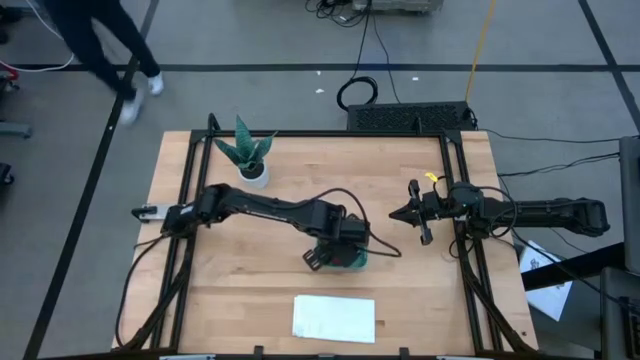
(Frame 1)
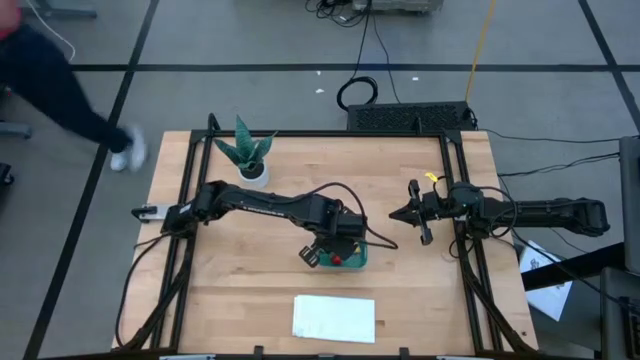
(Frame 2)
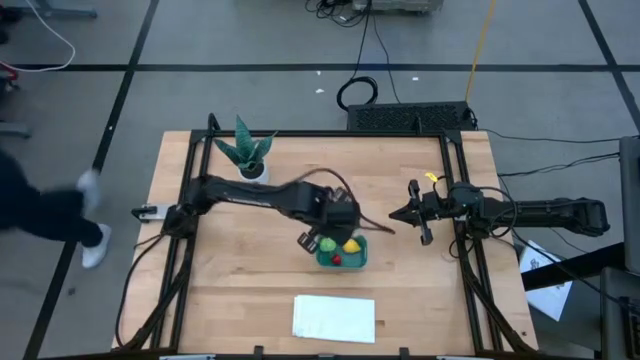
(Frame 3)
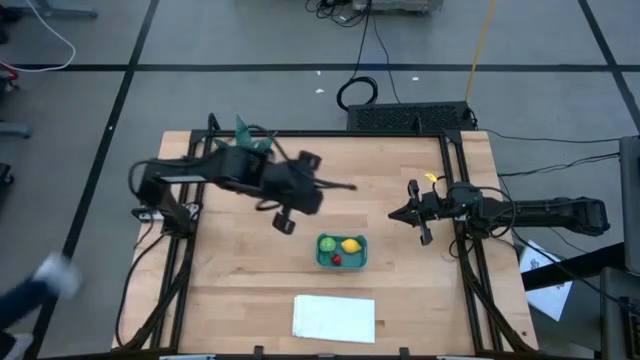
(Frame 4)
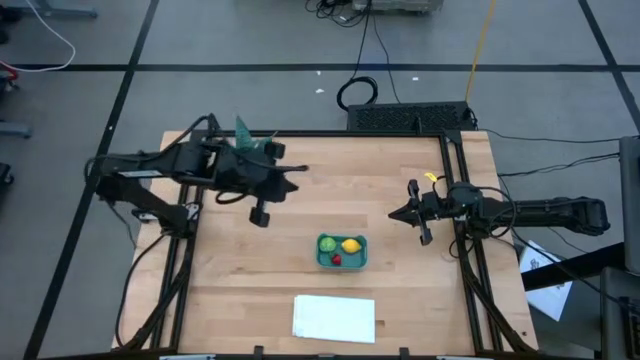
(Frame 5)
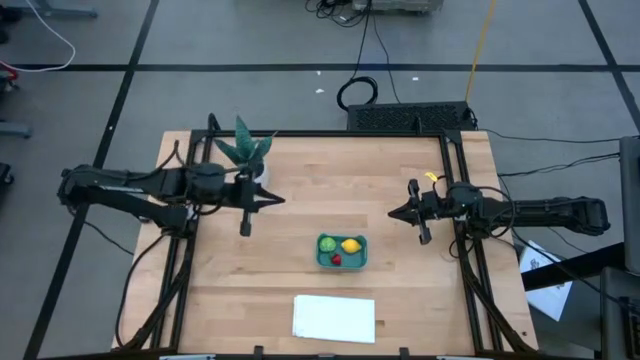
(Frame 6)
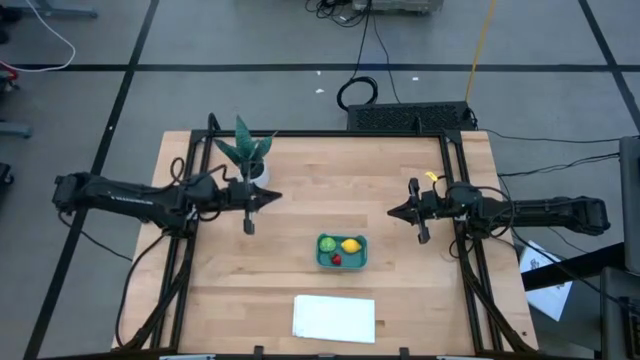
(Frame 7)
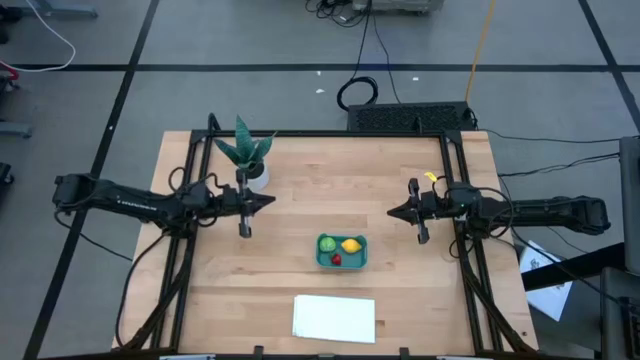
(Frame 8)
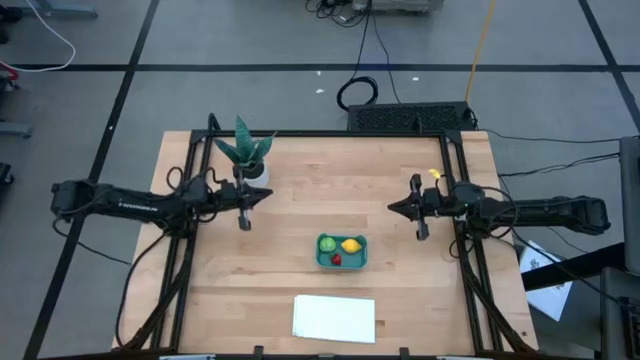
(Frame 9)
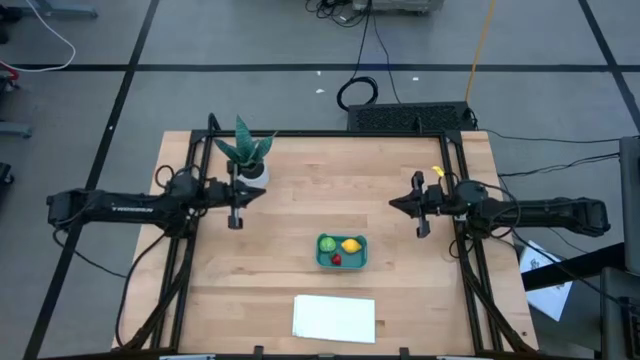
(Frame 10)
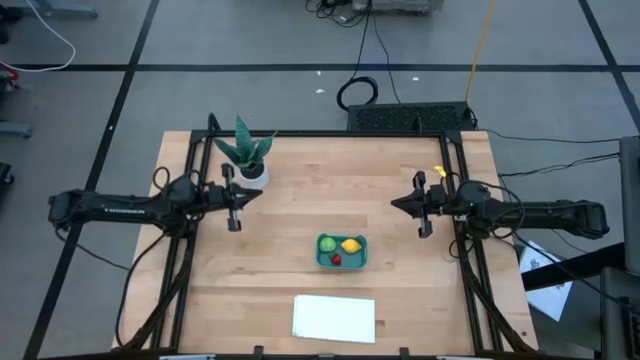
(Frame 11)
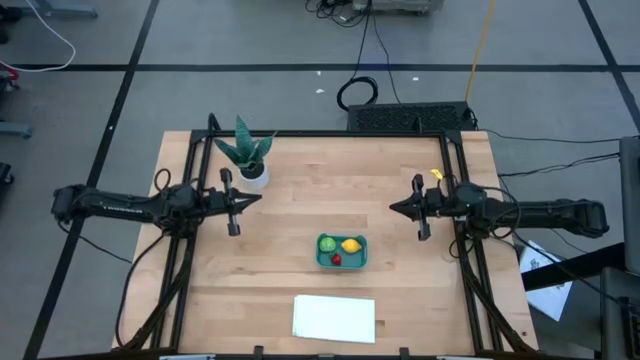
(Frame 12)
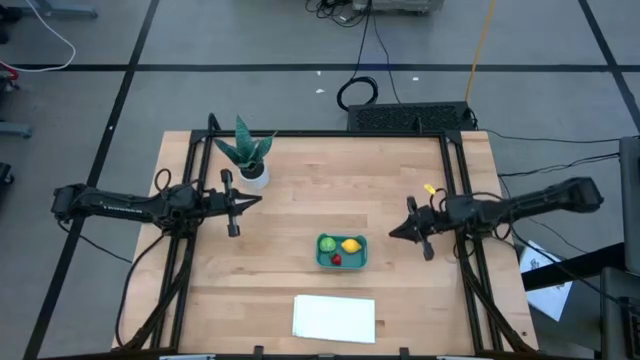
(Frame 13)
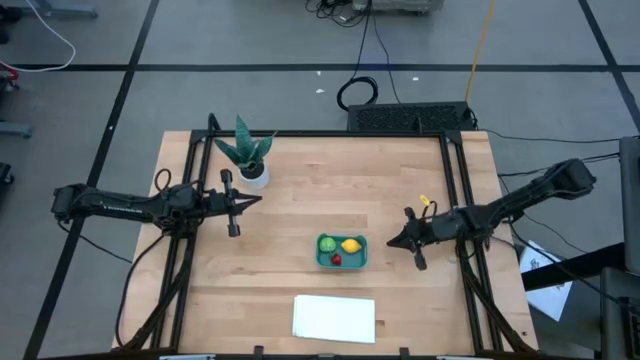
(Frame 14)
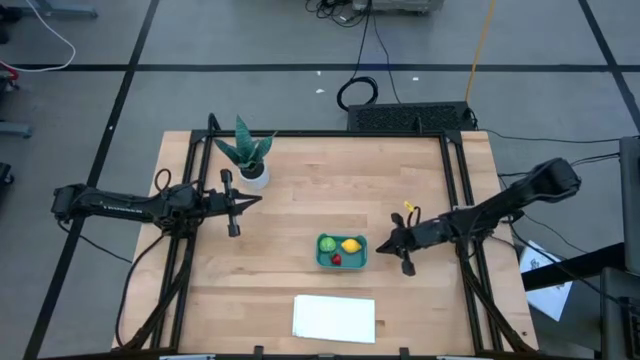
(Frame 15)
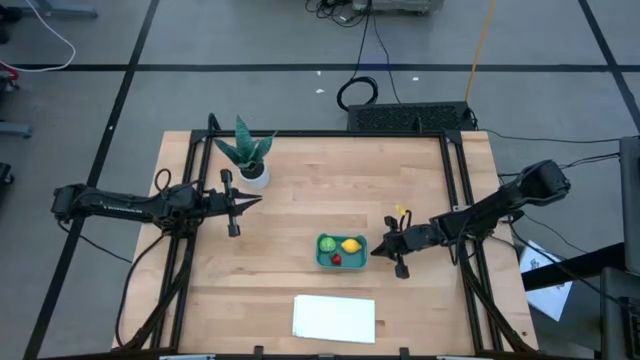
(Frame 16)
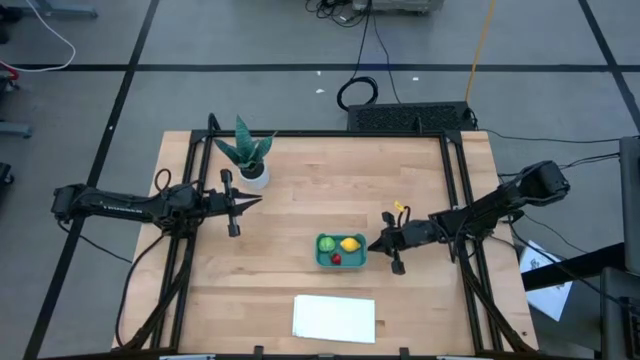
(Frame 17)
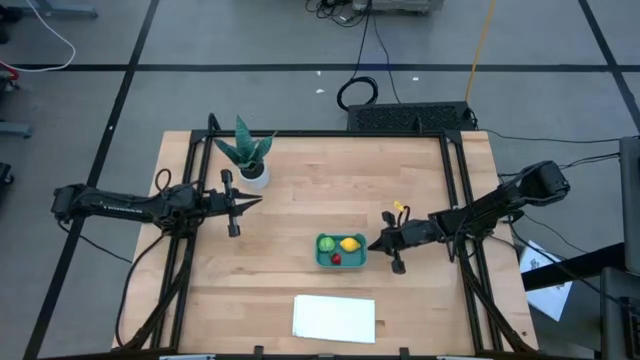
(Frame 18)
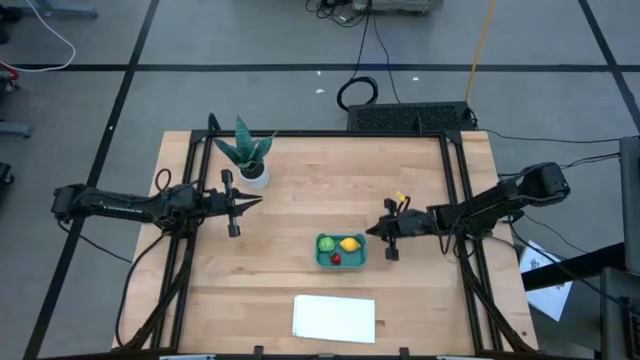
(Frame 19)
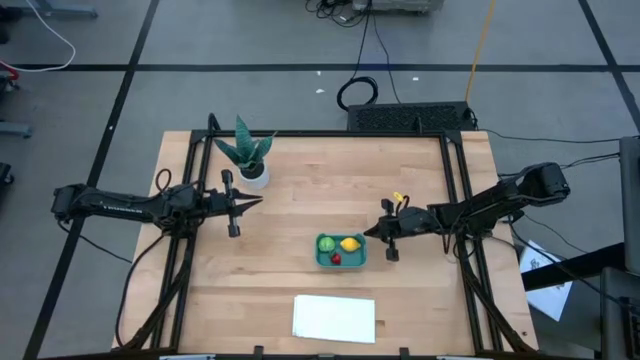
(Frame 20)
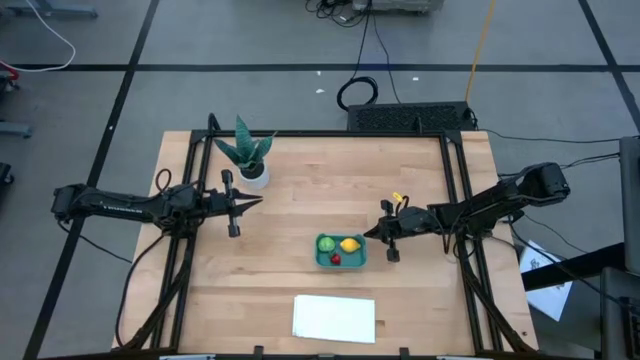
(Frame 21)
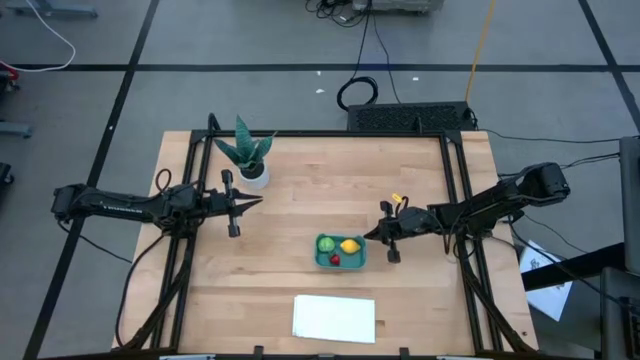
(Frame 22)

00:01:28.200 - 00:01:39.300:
Task: Pick and placing Produce into tupperware
Adjust the blue bin

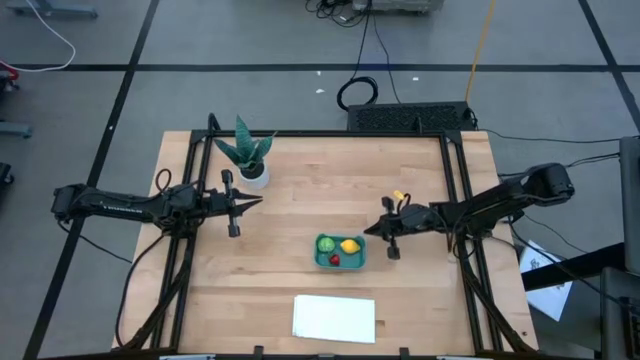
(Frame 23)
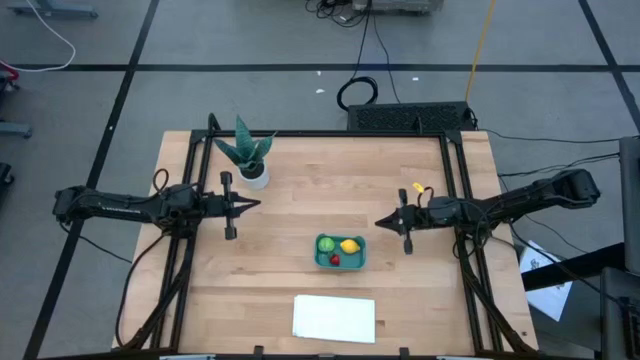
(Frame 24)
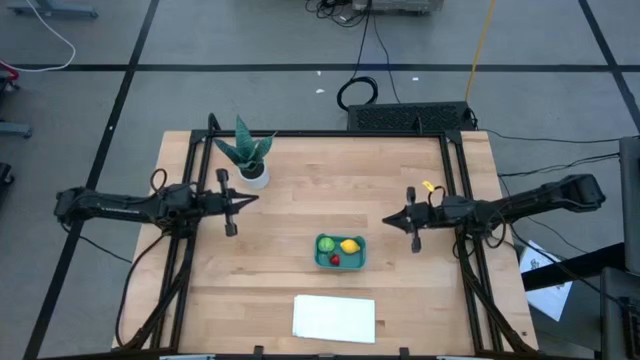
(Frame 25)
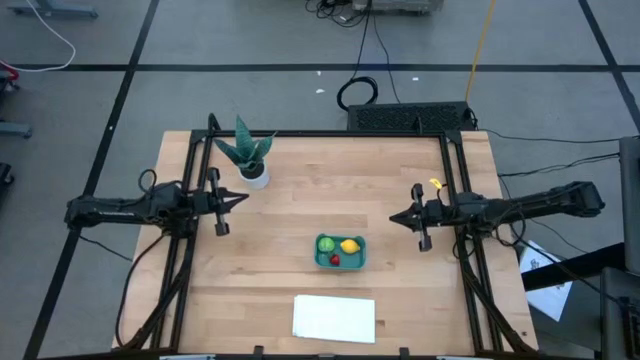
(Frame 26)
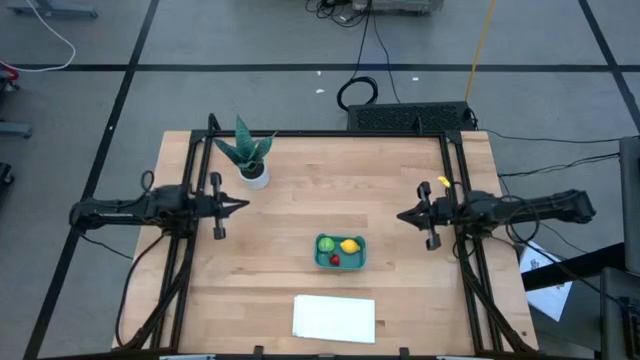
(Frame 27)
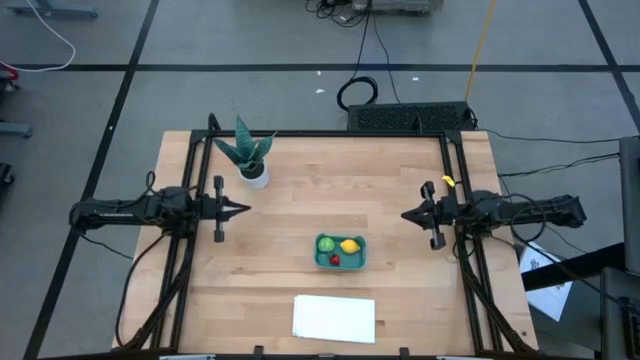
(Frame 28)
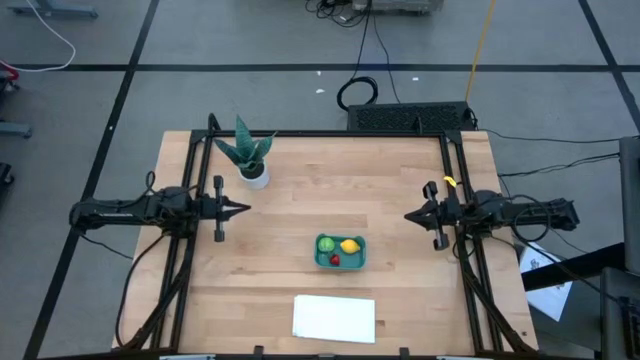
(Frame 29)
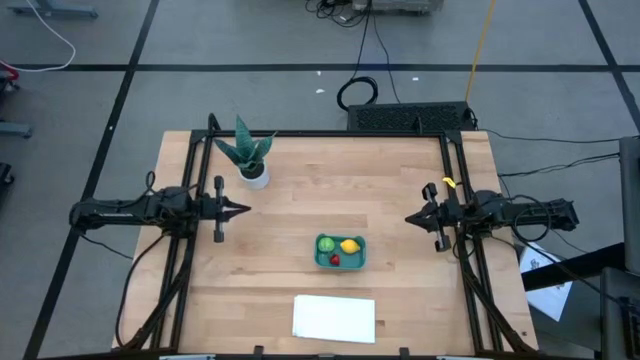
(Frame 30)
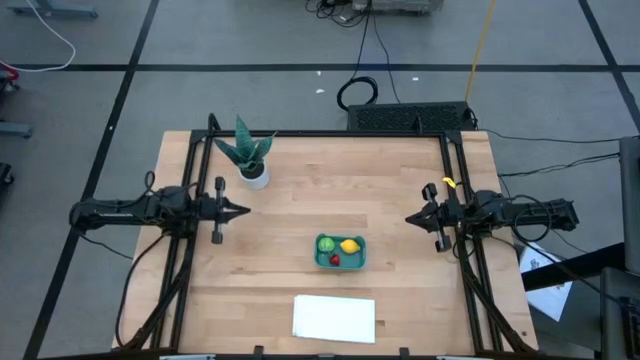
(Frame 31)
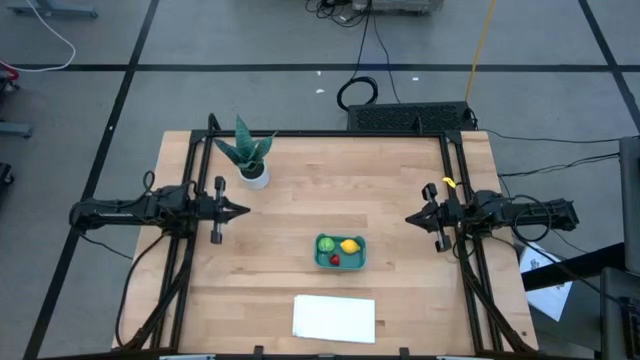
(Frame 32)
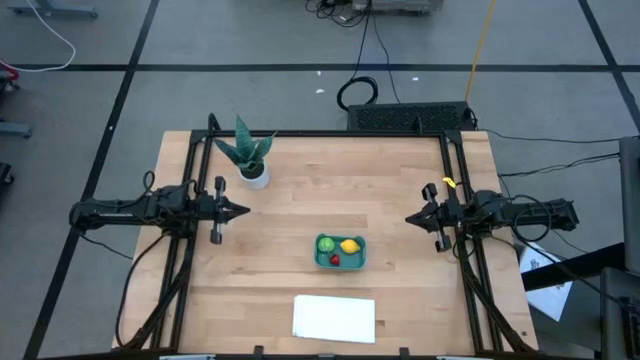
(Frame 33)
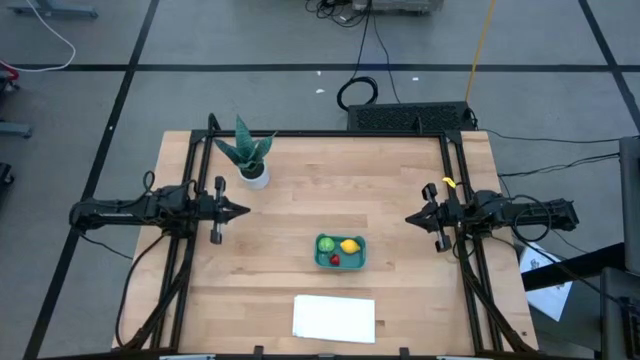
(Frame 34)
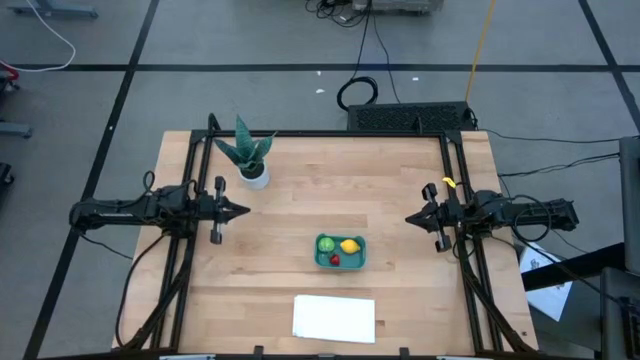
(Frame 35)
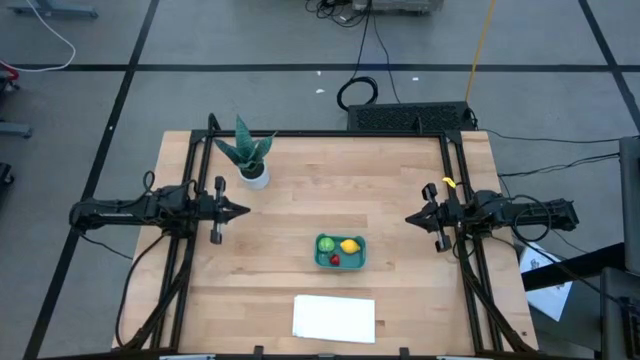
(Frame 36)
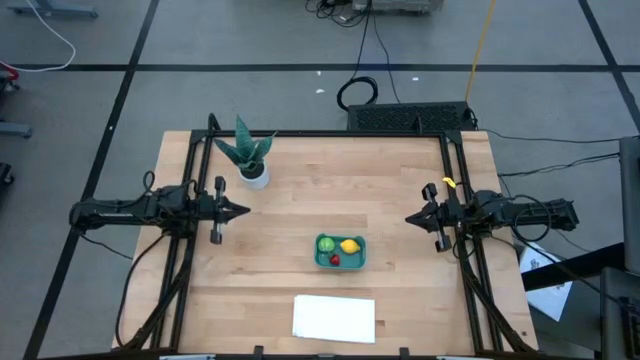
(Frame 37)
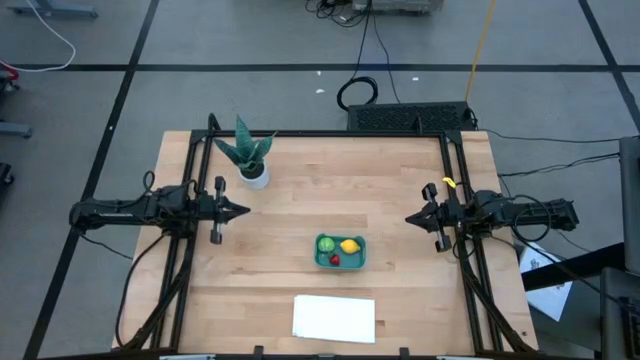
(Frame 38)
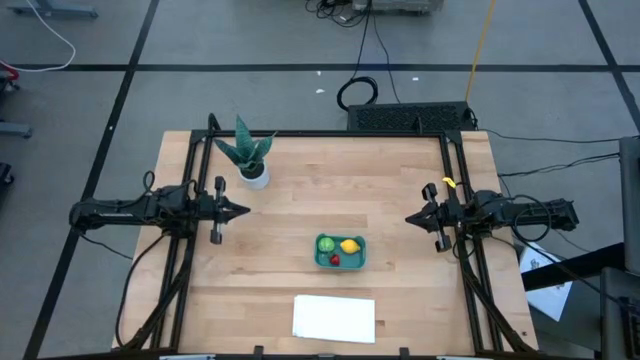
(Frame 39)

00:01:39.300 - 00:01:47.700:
Return to Home Position

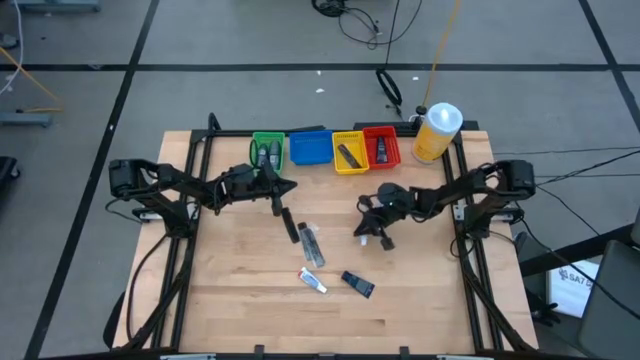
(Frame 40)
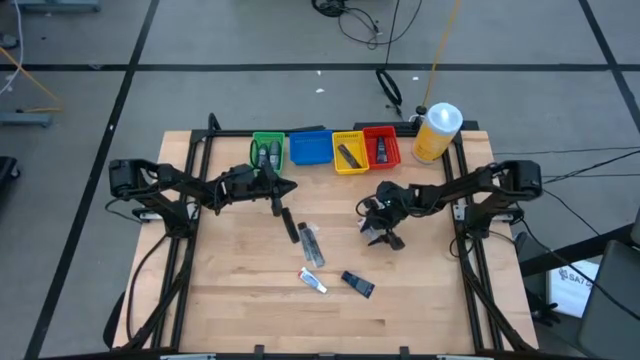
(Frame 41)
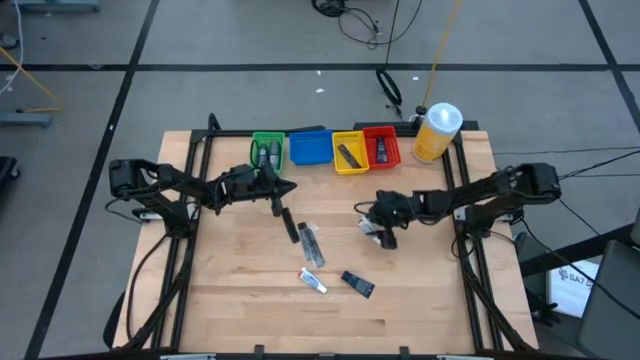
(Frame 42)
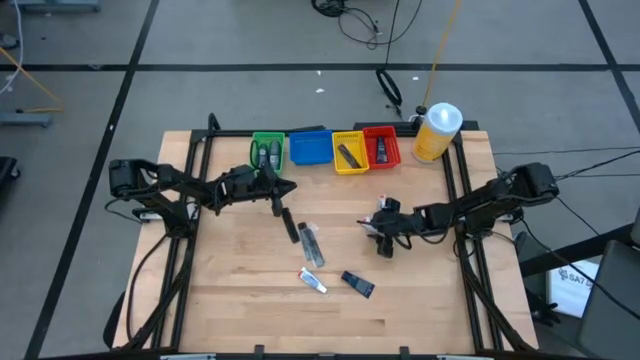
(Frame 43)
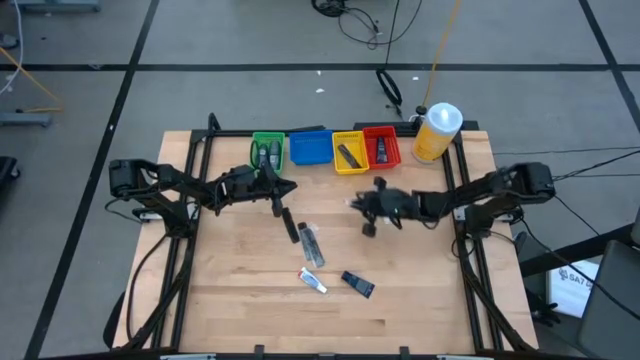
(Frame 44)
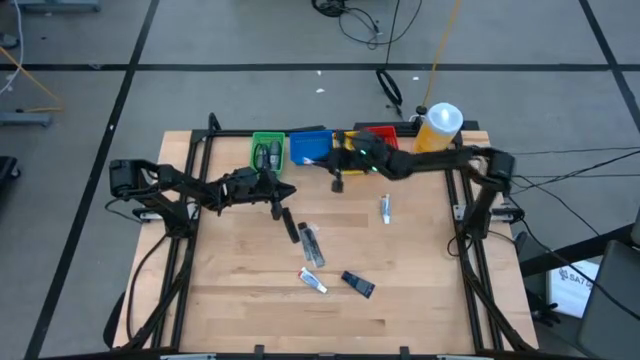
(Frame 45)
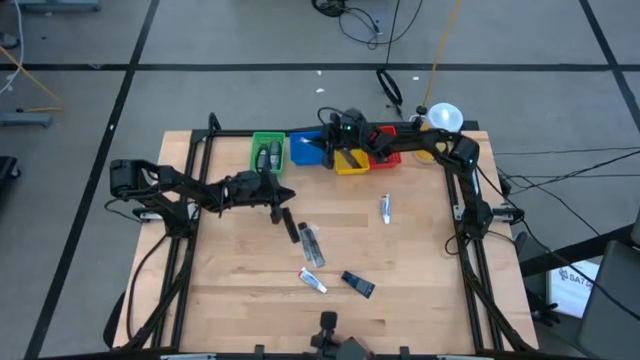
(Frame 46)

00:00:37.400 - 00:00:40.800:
Task: Pick & Place Travel size toiletries
Put the bottom right white toothpaste into the blue bin
